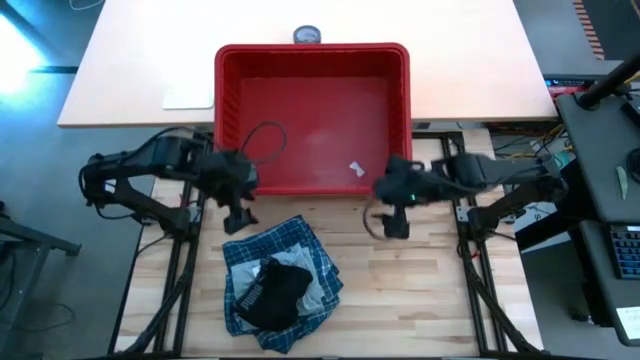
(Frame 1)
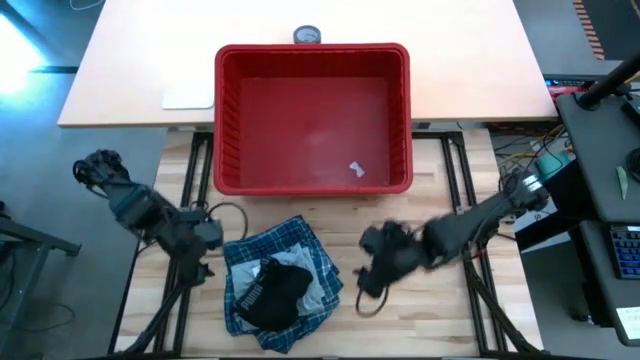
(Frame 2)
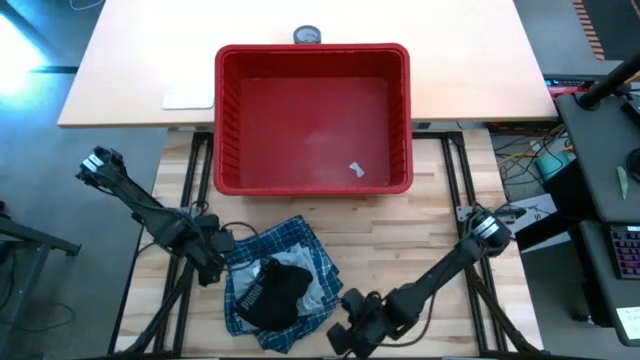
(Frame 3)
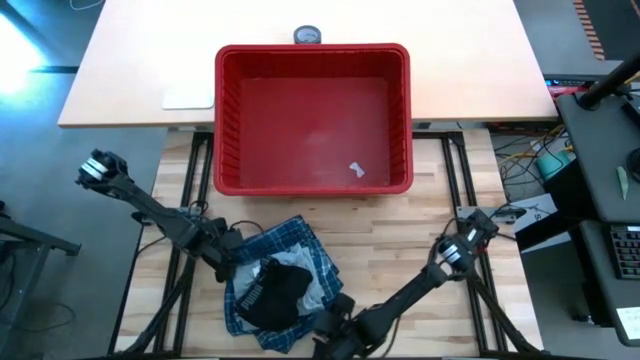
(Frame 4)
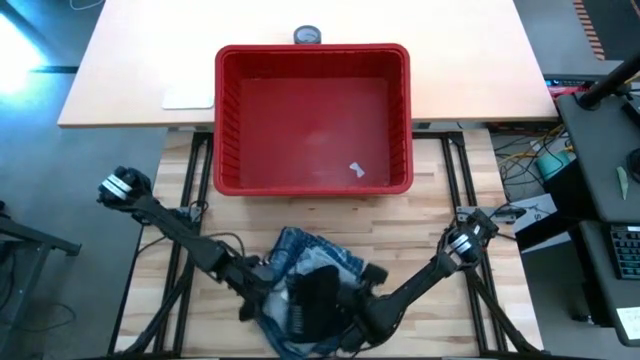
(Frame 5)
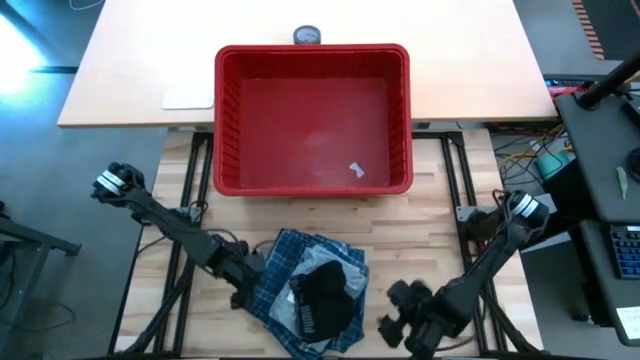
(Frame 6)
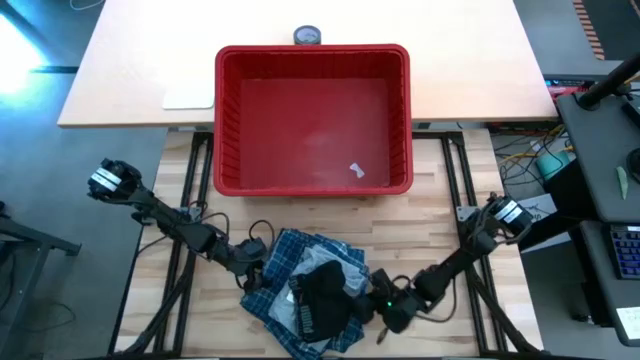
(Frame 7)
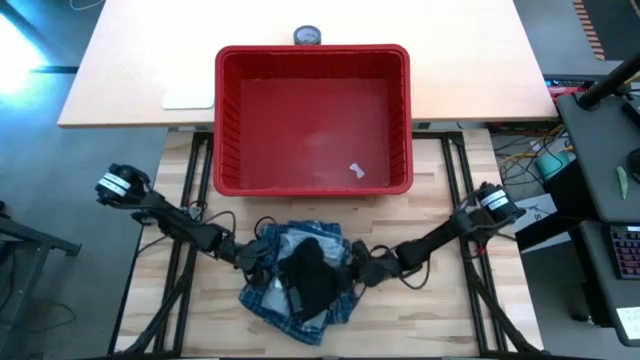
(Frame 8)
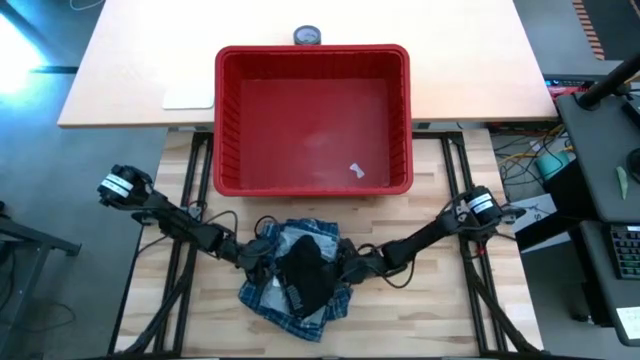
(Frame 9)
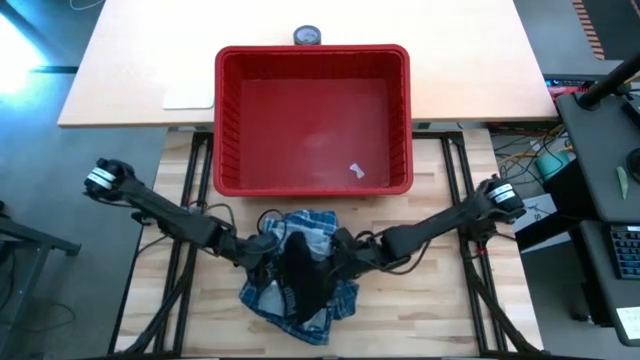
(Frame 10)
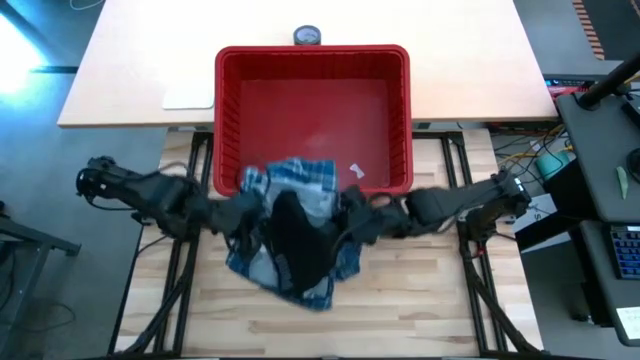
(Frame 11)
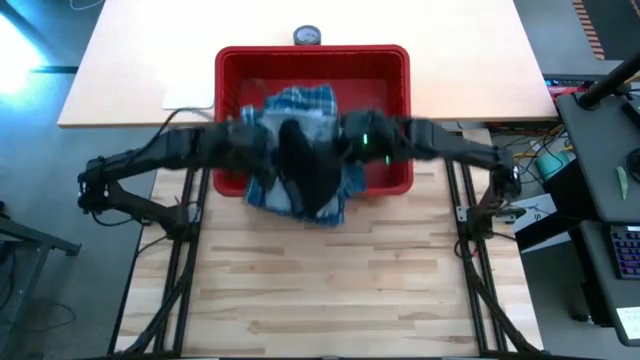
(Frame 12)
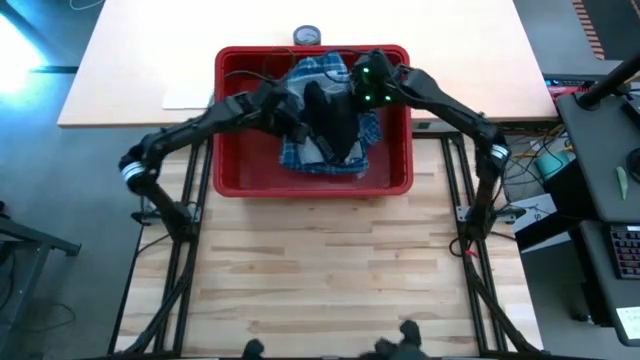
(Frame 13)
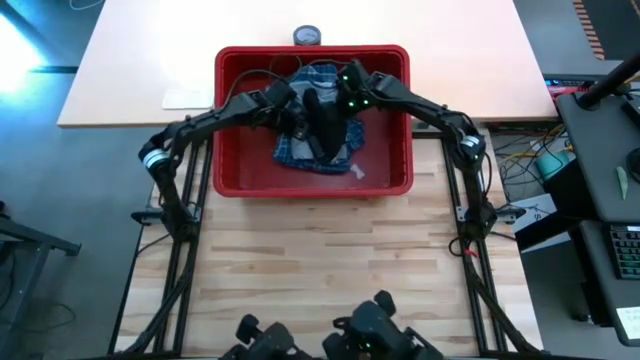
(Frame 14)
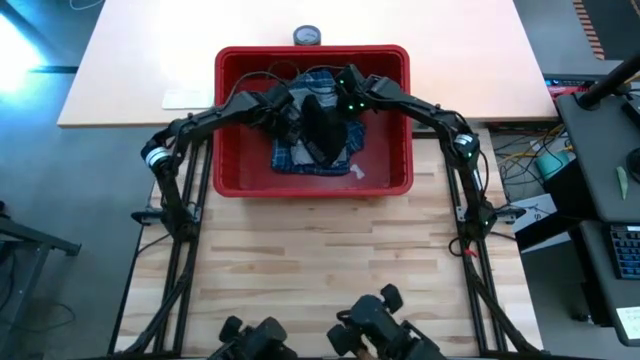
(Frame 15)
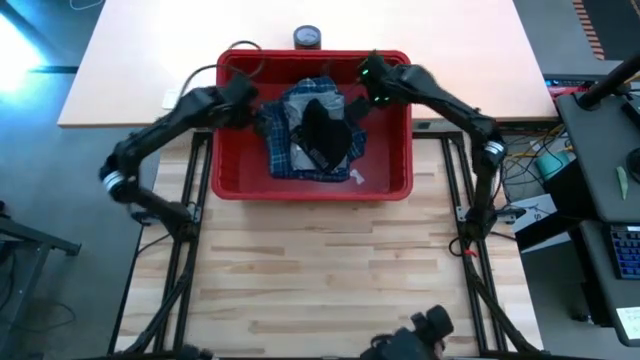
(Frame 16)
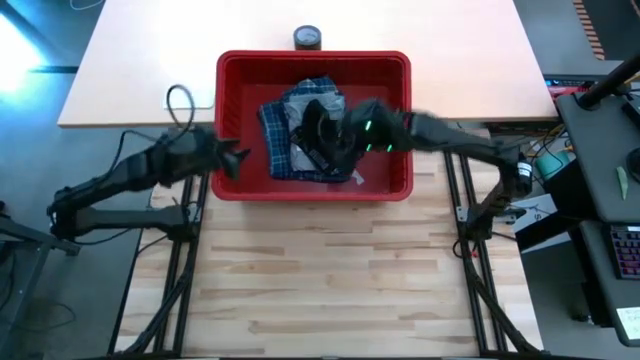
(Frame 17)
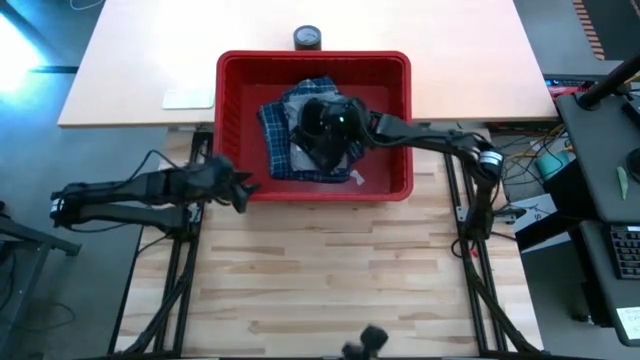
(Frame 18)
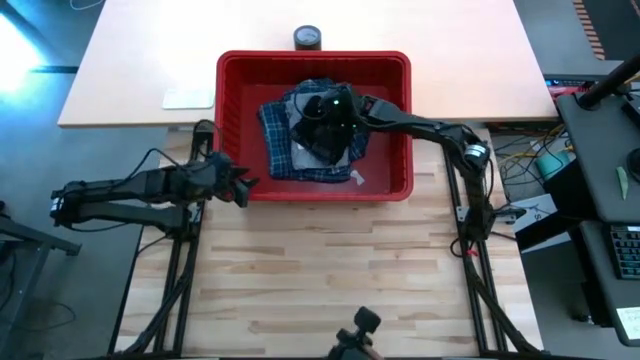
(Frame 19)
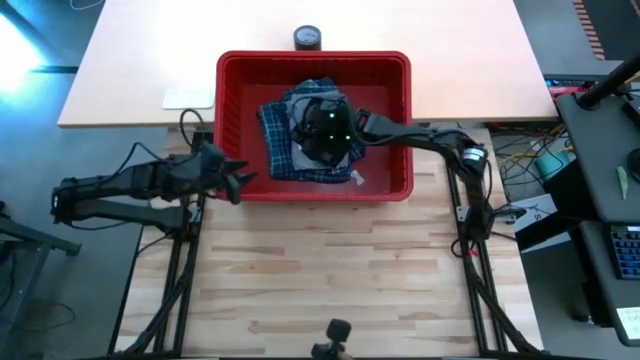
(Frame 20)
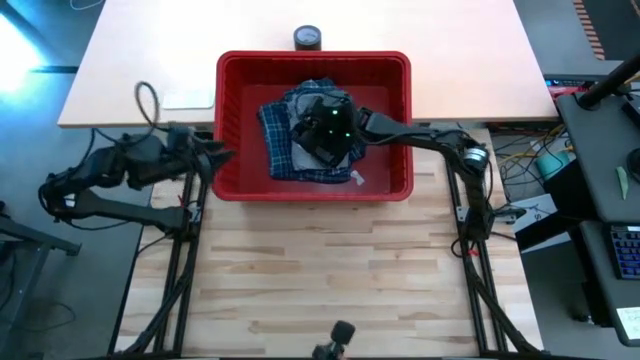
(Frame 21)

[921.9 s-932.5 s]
Task: Fold Laundry from Bin
Put the folded clothes into the red bin

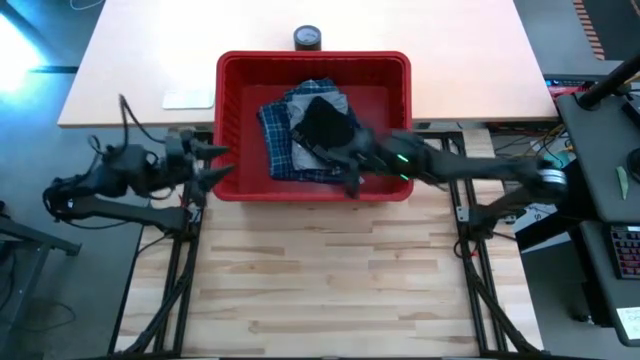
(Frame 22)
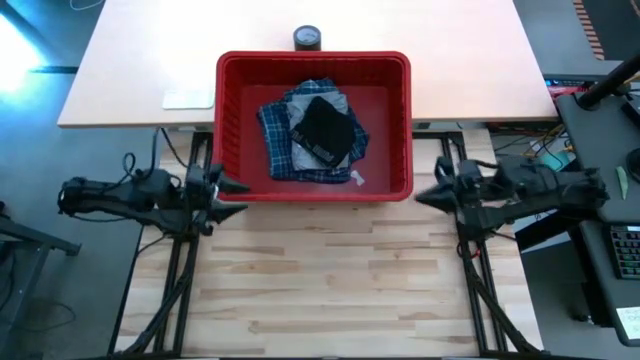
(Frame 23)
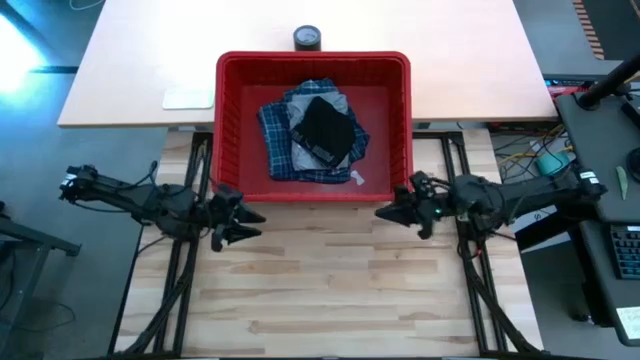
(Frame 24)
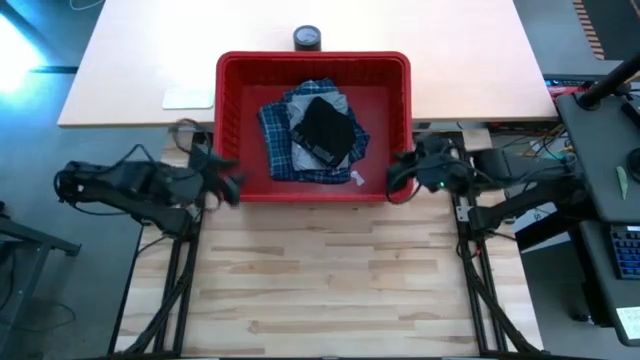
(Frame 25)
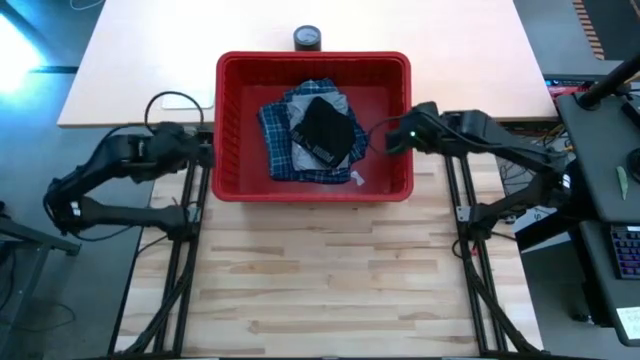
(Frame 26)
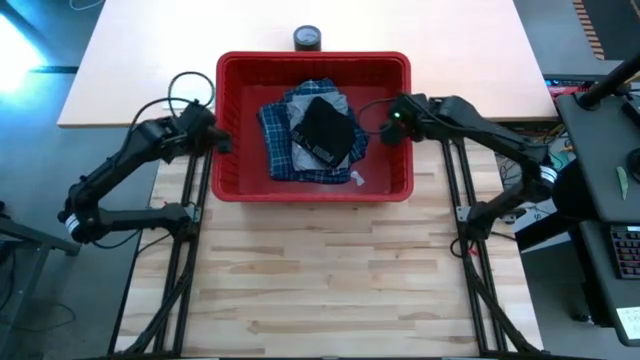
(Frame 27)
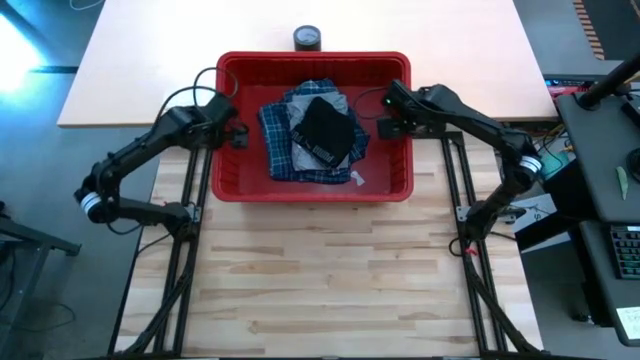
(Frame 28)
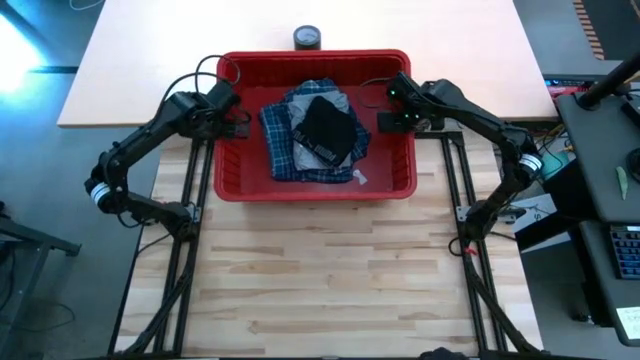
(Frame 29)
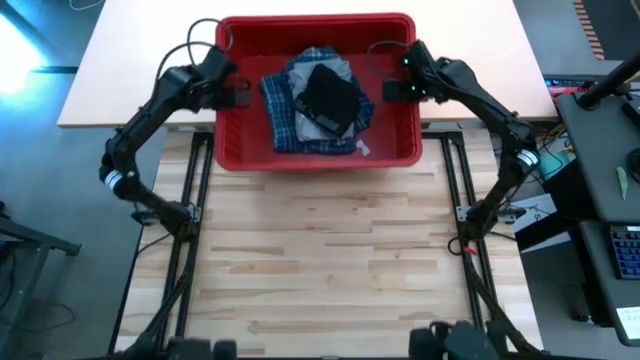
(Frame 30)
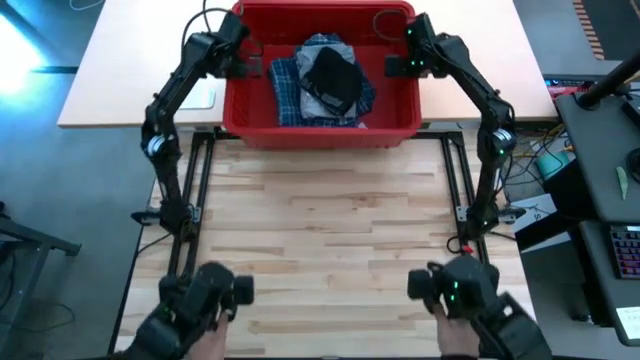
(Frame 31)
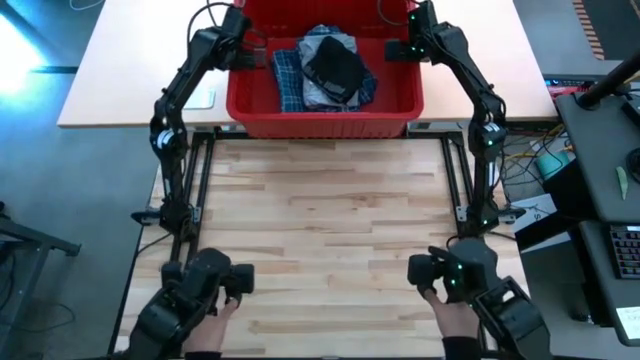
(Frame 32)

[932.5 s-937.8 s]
Adjust the red bin

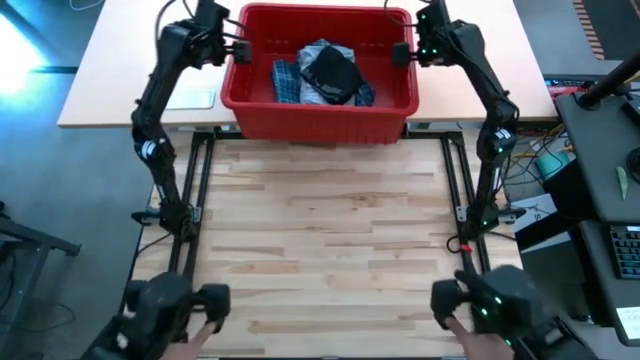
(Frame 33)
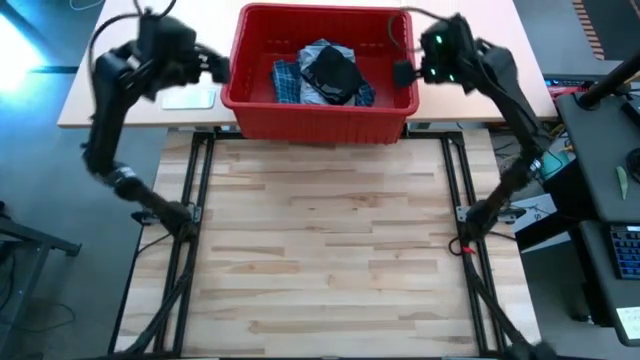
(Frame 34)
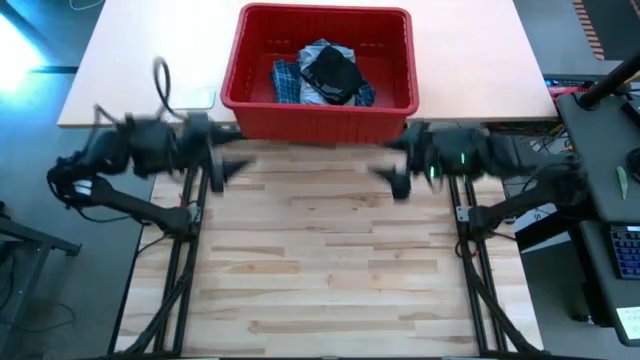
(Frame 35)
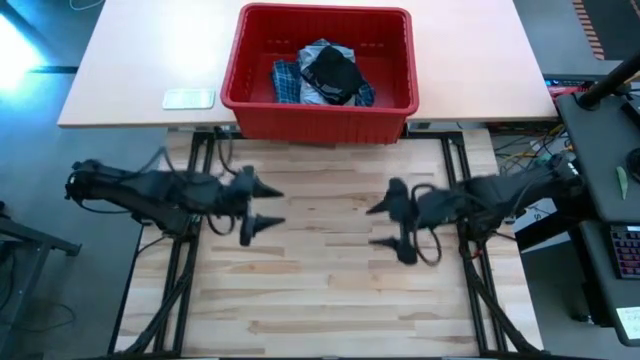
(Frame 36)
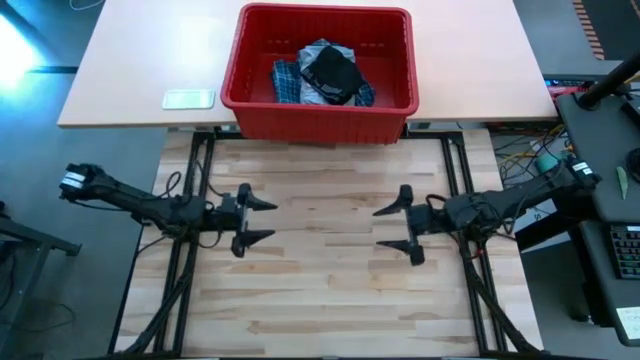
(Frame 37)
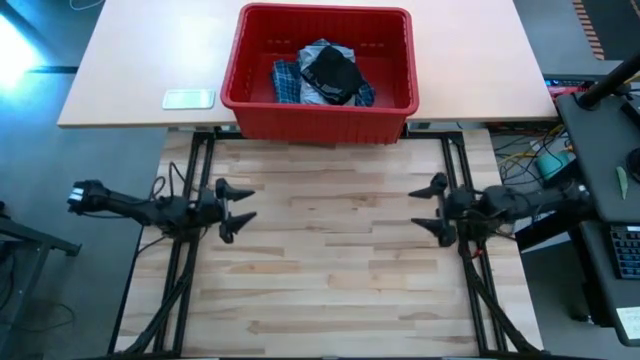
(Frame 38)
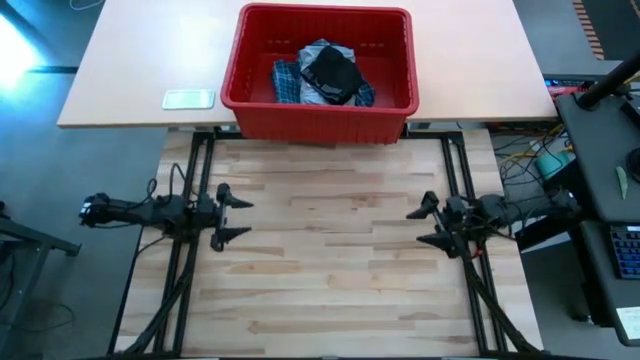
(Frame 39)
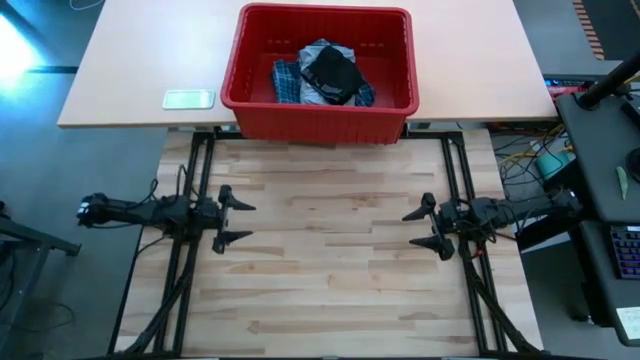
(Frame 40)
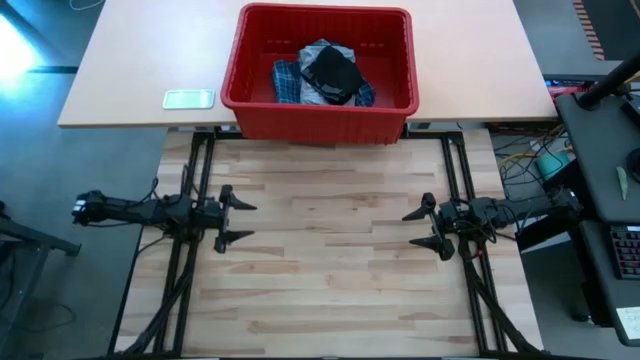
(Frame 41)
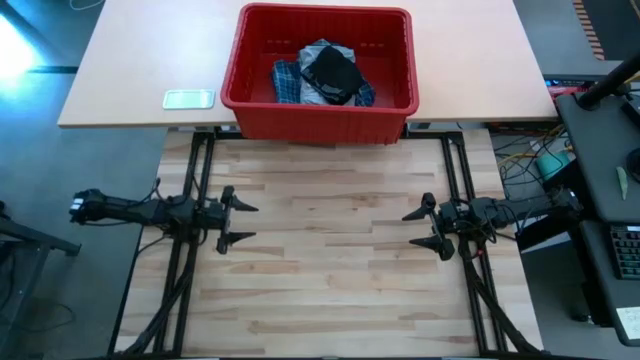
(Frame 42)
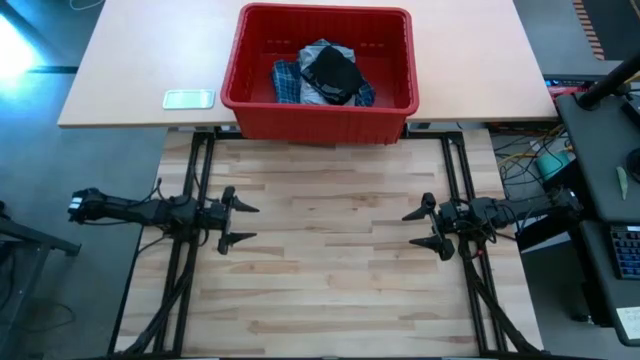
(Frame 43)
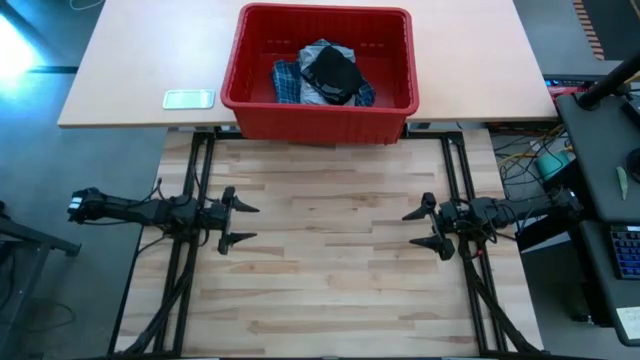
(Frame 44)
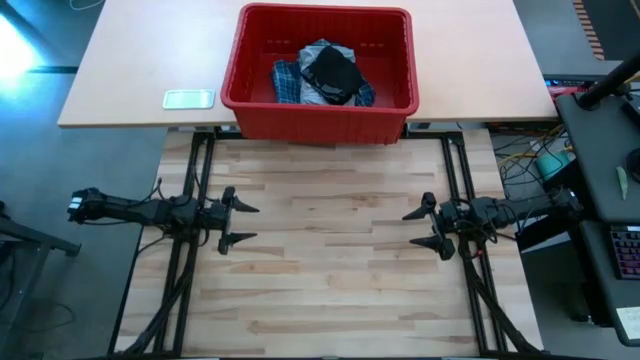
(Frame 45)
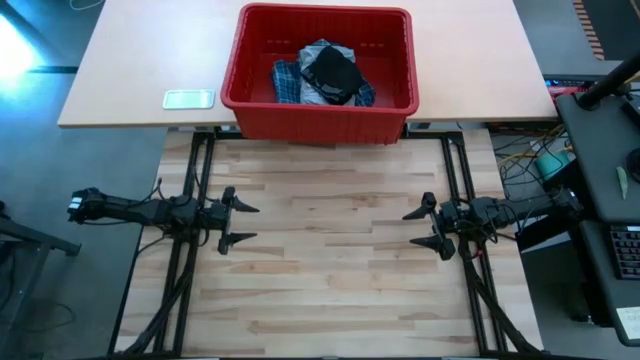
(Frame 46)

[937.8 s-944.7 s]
Return to Home Position
